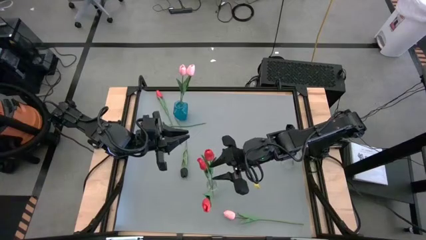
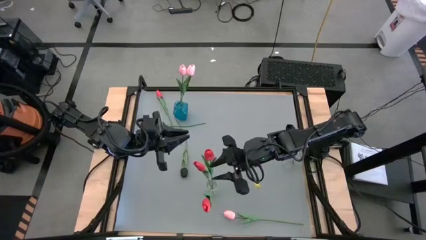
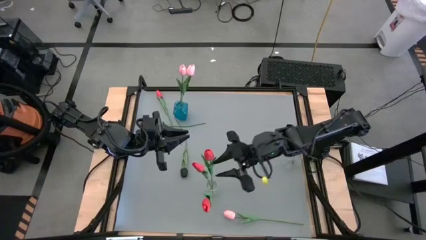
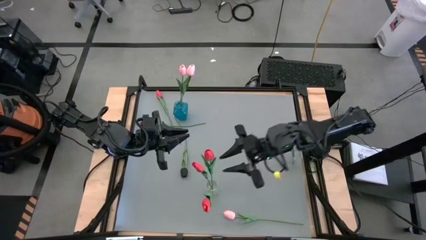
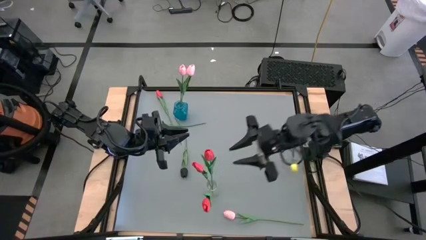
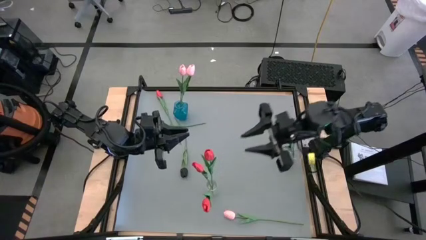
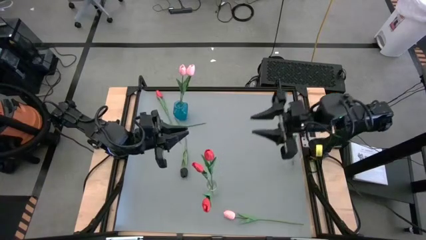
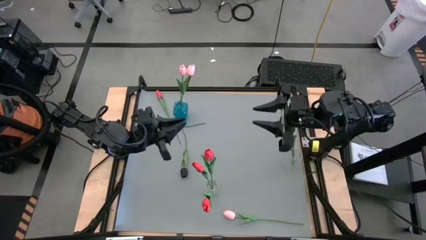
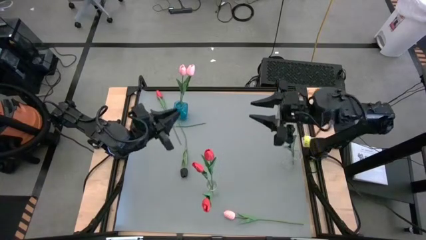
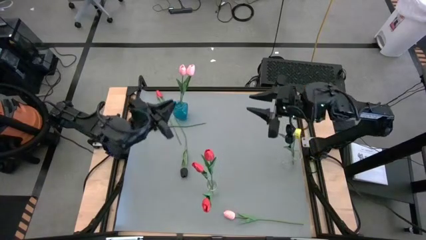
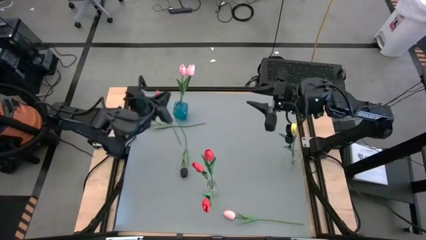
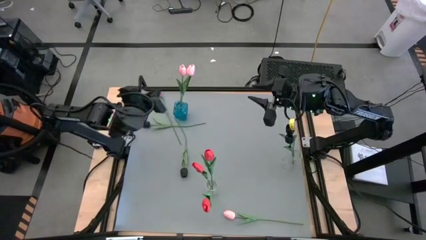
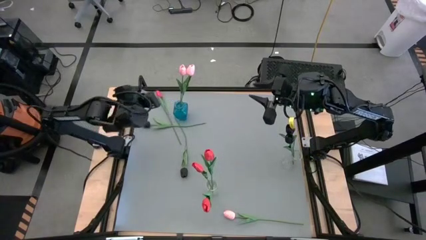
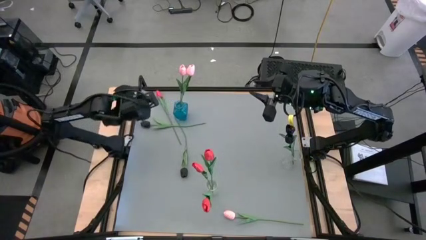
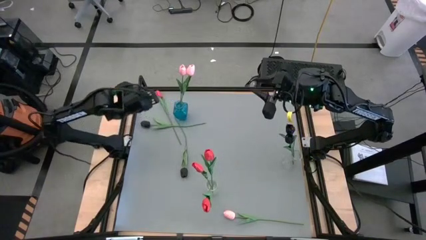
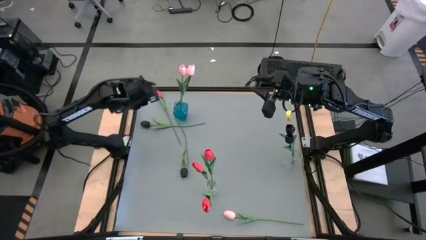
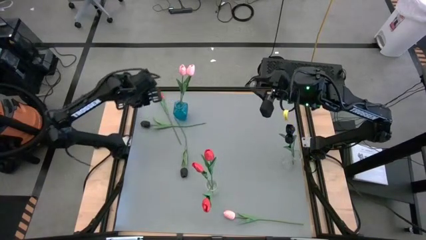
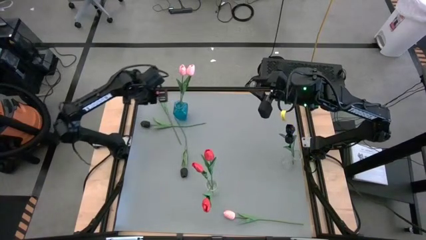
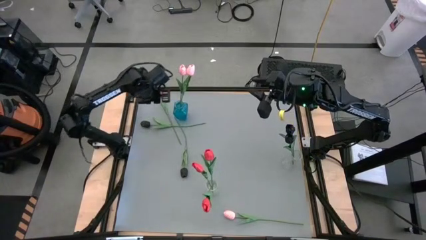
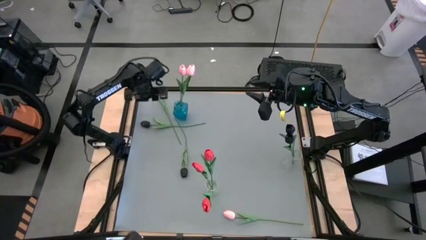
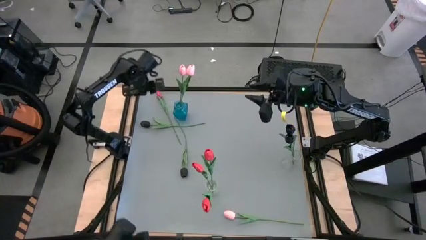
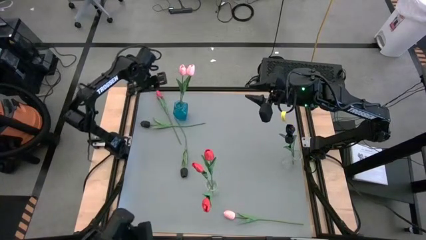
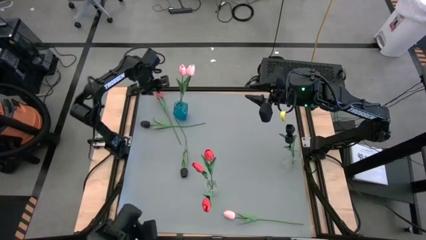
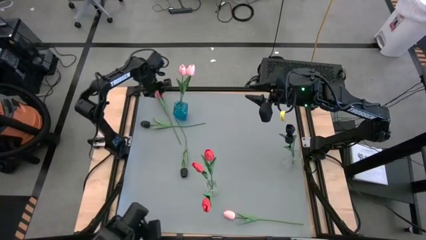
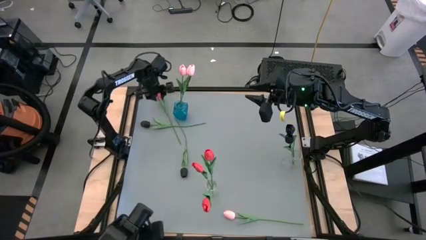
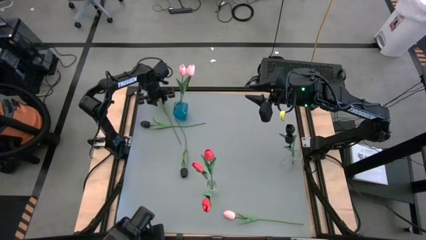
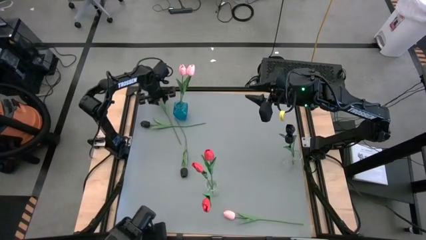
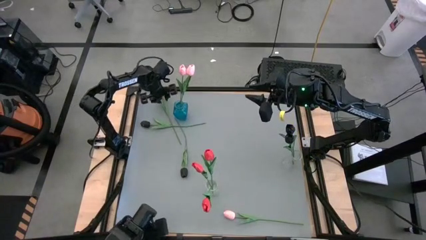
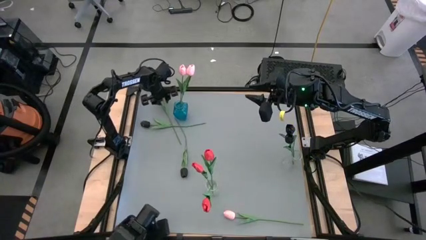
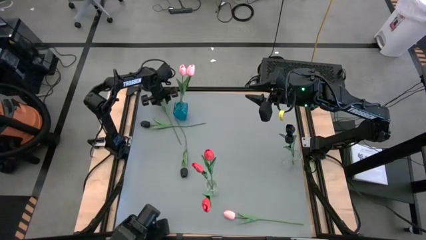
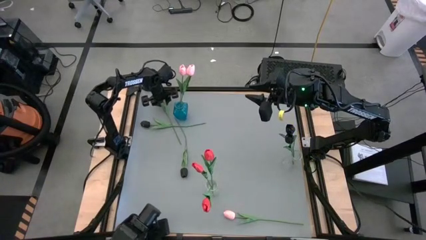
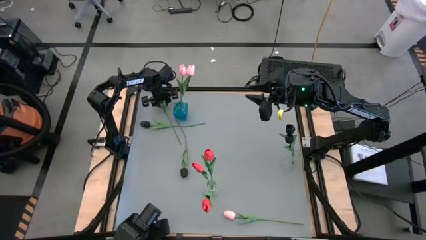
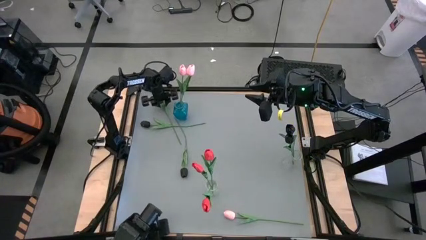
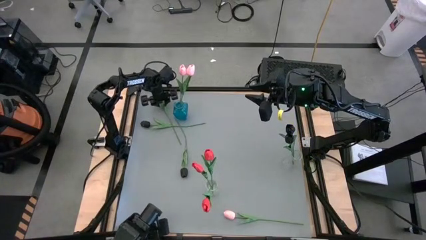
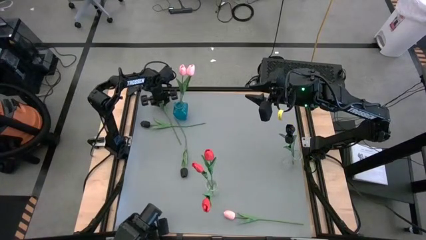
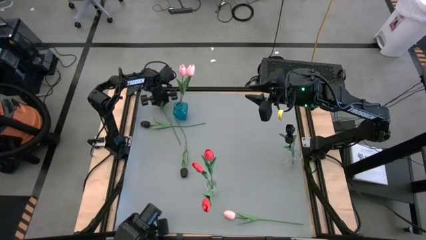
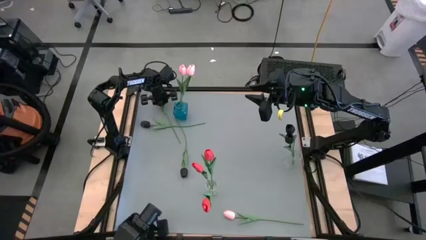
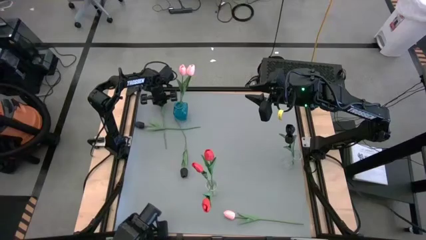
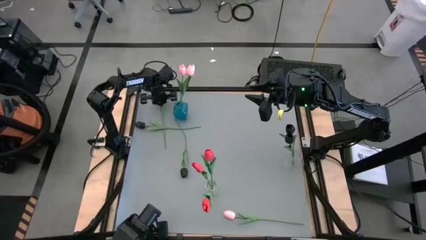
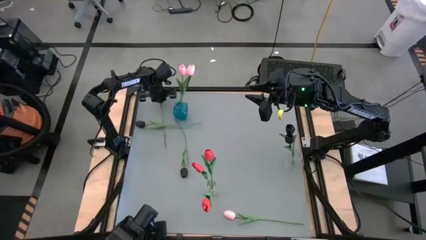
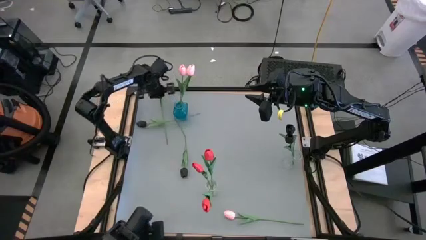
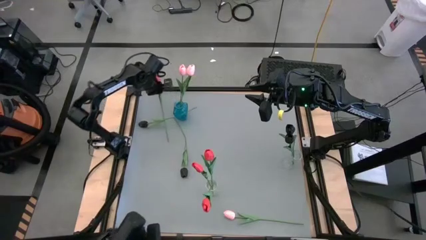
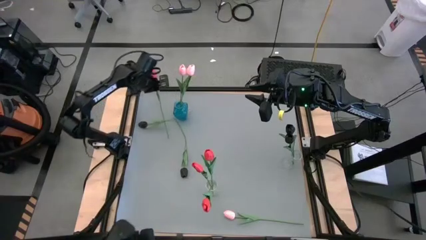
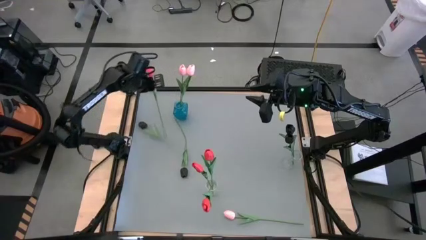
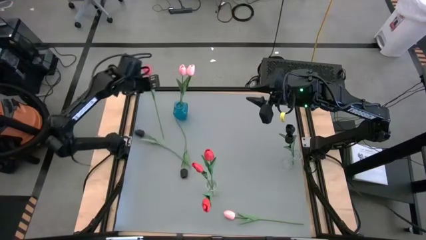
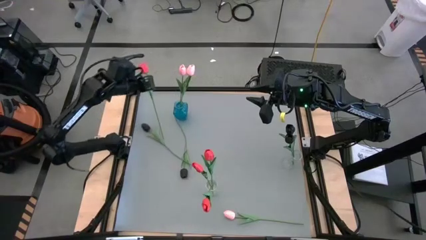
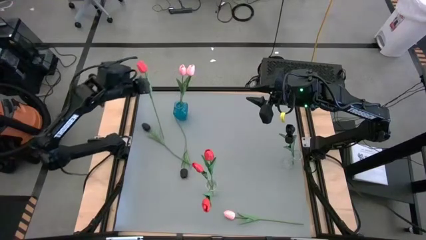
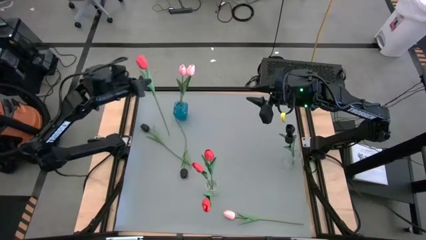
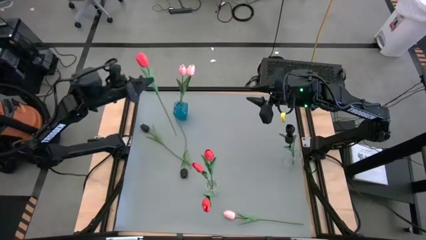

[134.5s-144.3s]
Task: Sort flowers into vase by color
Put the red flower into the left transparent vase

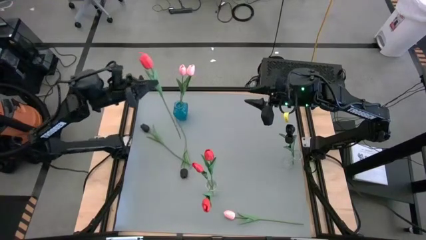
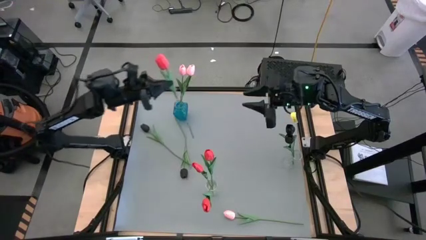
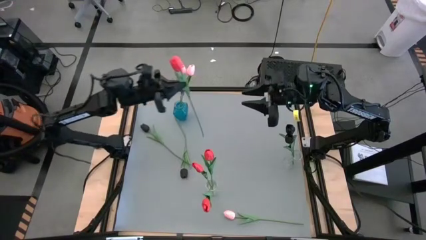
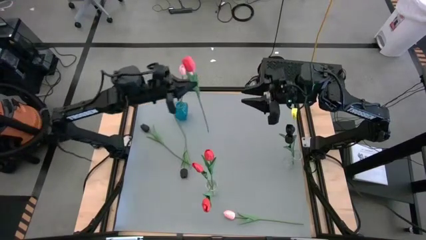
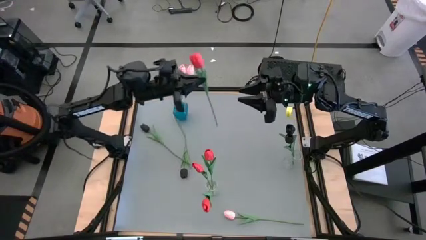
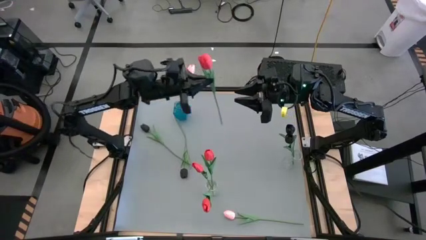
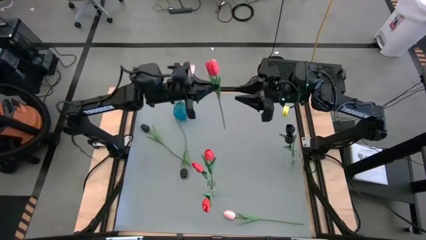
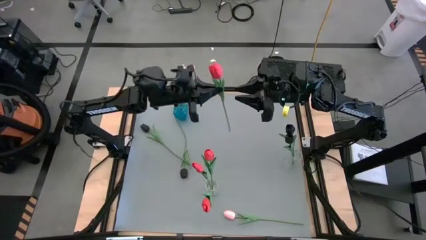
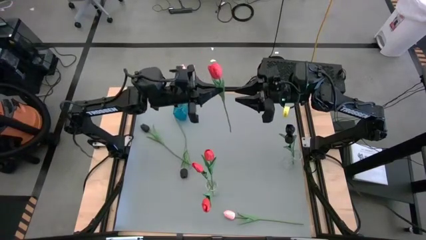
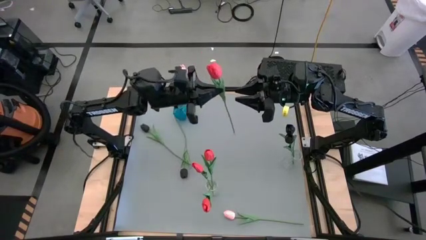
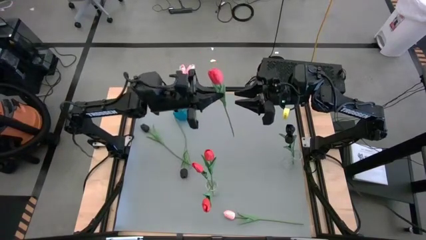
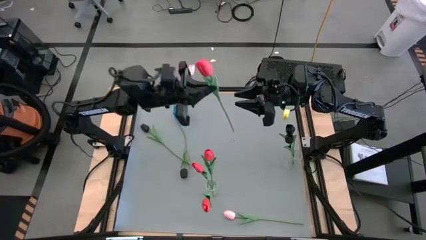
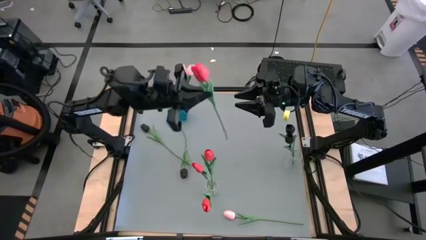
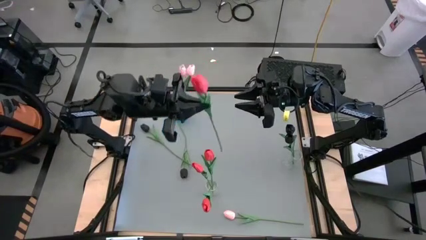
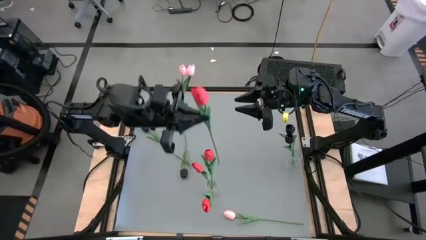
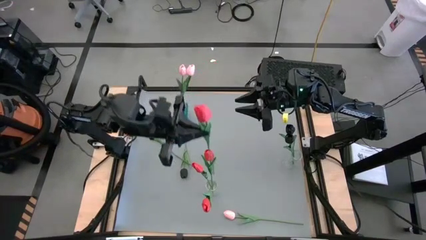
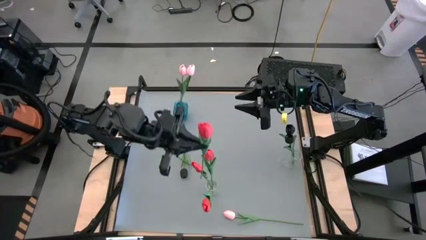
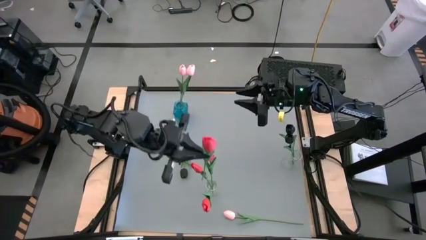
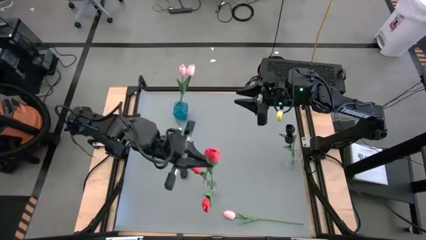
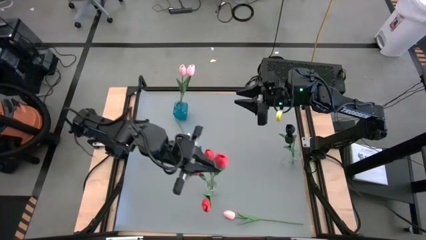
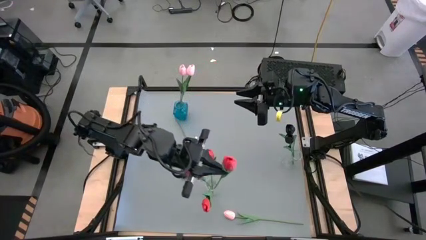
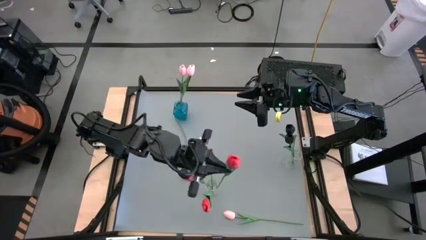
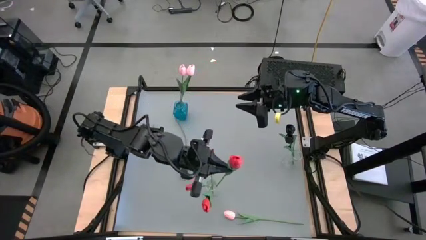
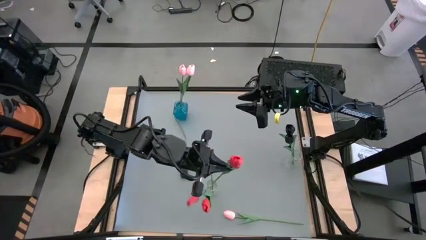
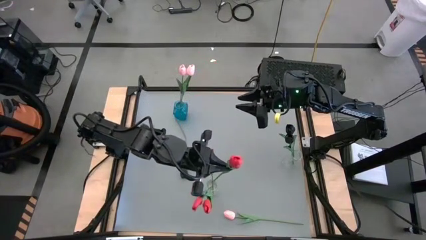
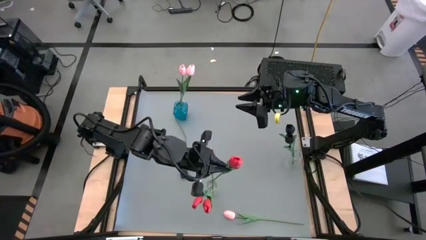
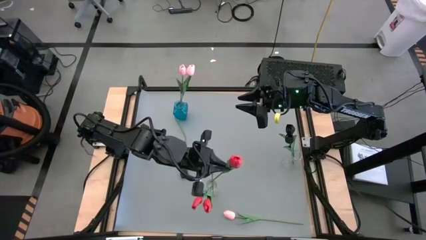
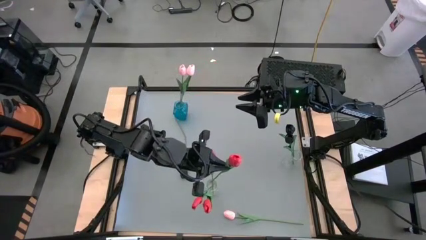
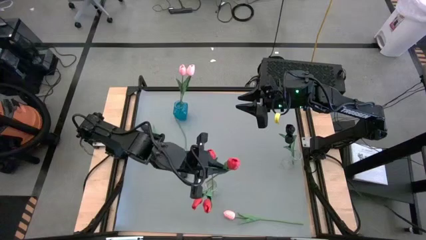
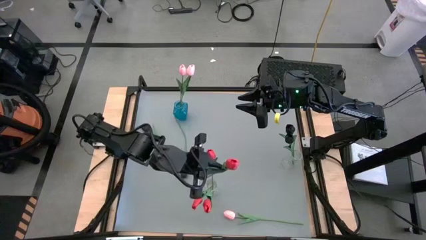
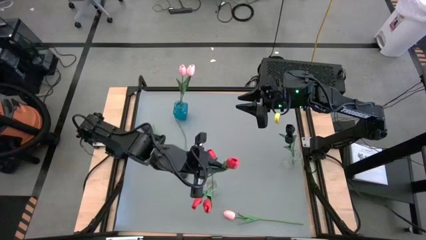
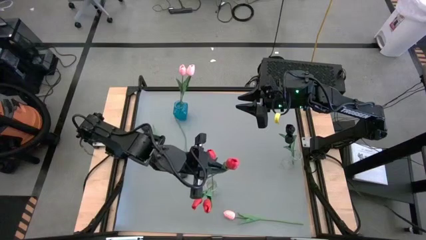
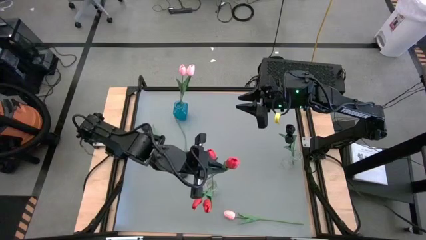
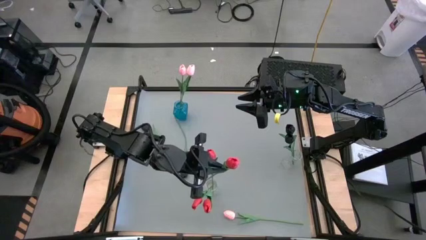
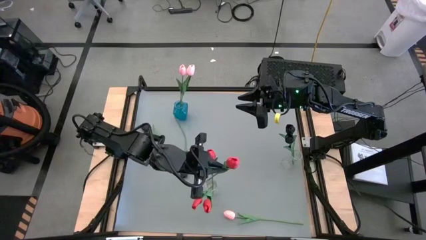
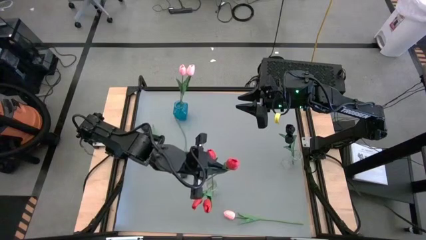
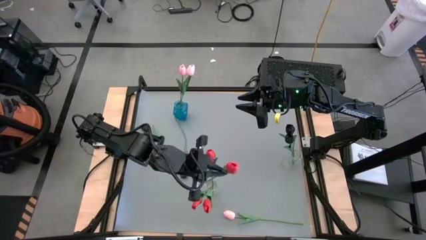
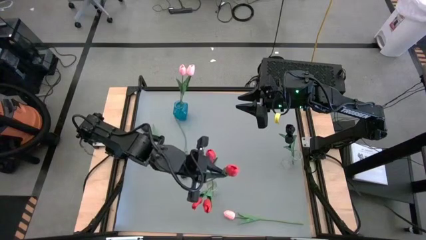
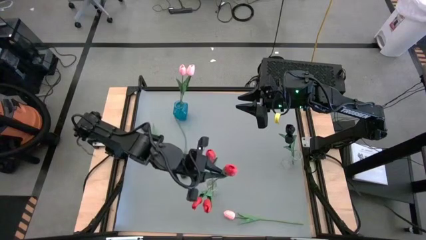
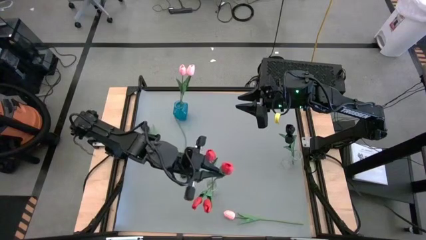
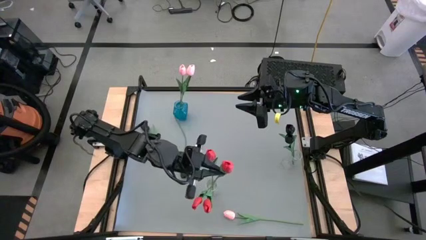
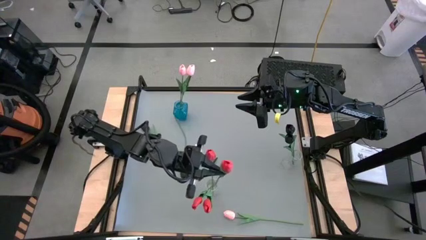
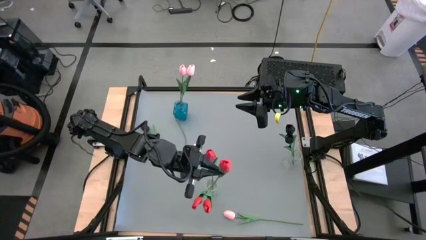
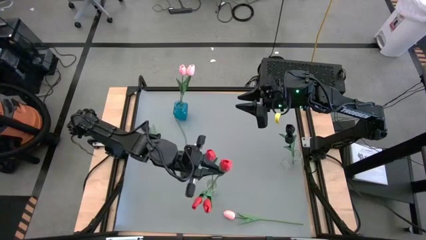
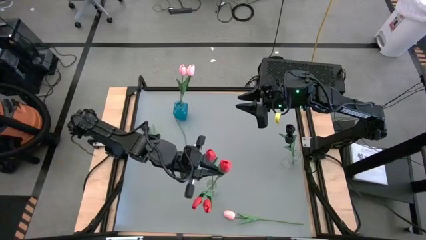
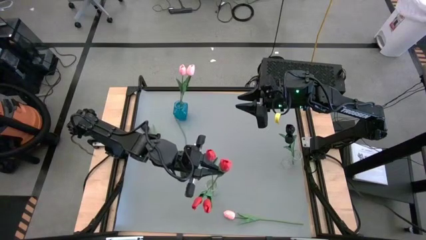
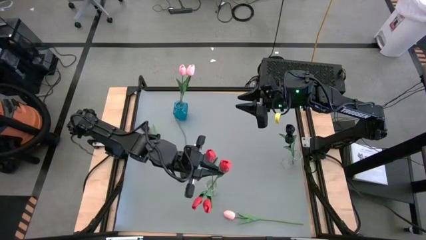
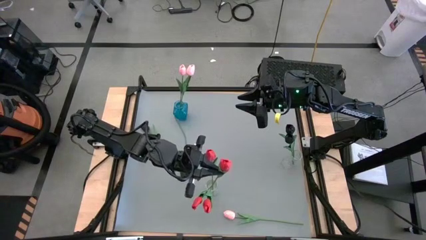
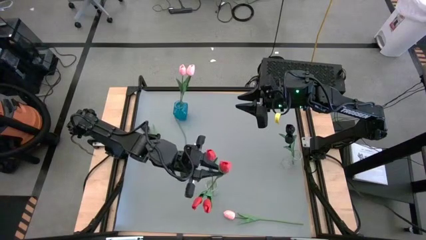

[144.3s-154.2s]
Put the red flower into the left transparent vase
